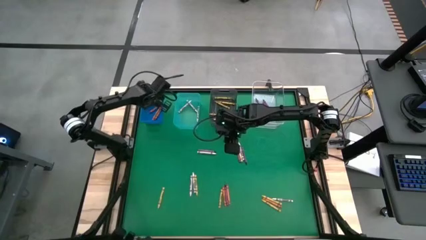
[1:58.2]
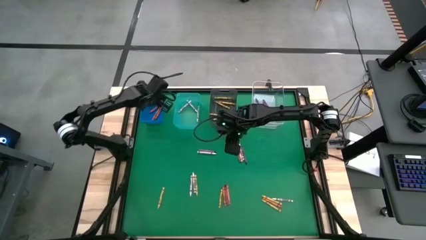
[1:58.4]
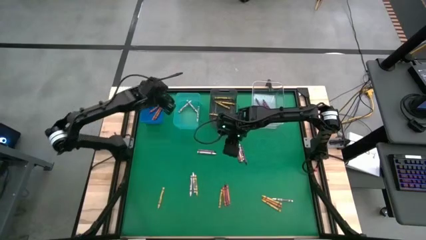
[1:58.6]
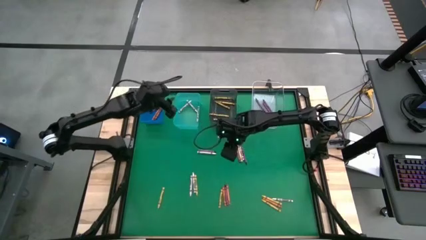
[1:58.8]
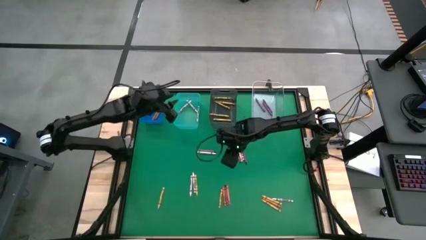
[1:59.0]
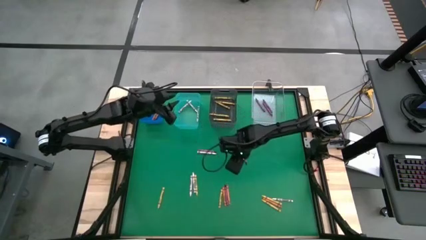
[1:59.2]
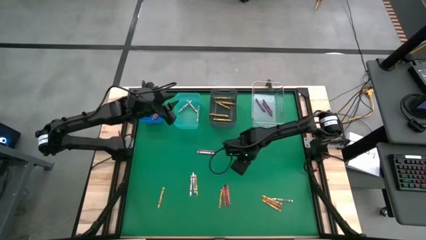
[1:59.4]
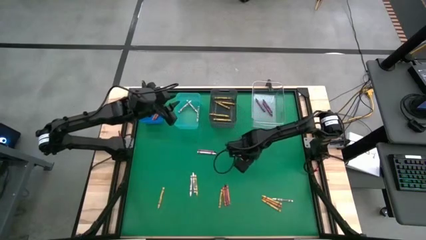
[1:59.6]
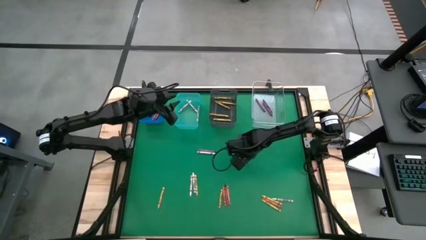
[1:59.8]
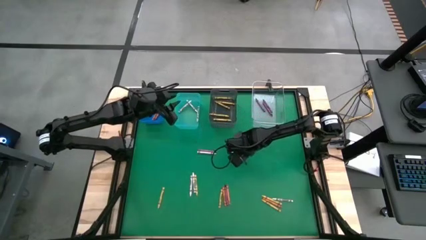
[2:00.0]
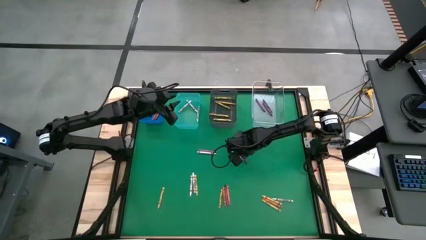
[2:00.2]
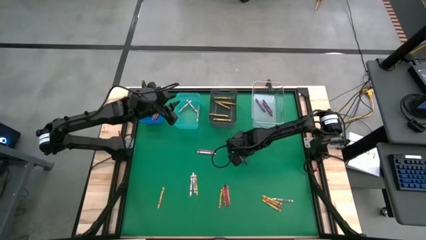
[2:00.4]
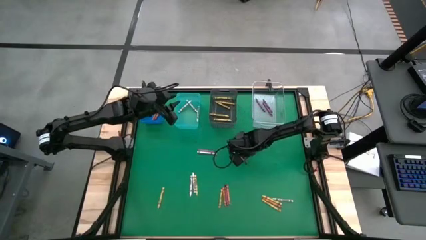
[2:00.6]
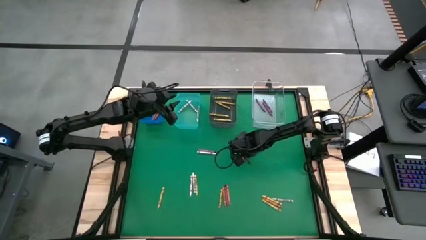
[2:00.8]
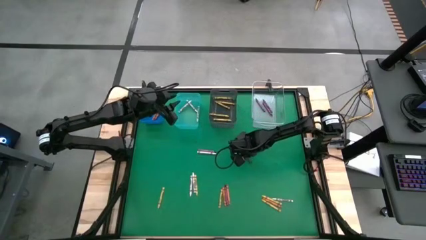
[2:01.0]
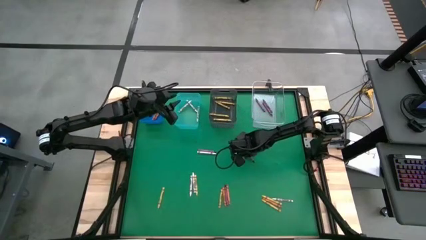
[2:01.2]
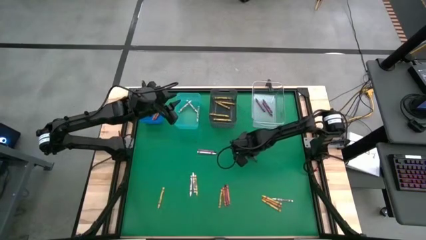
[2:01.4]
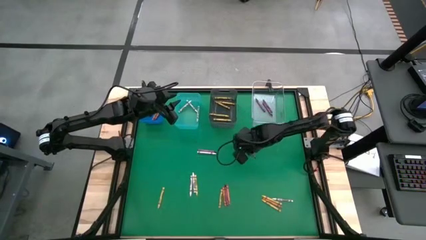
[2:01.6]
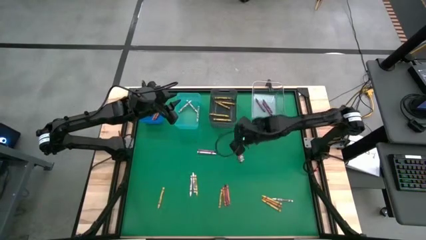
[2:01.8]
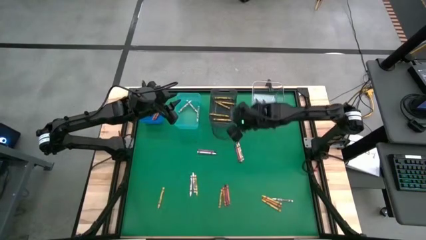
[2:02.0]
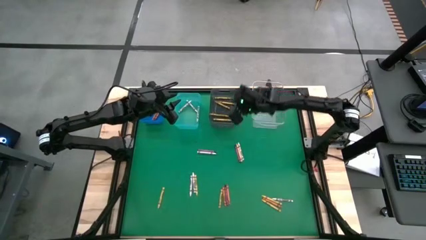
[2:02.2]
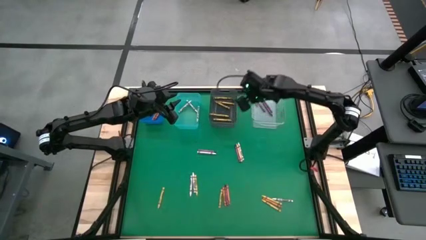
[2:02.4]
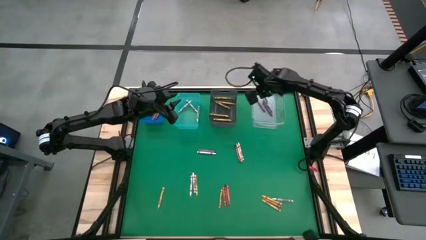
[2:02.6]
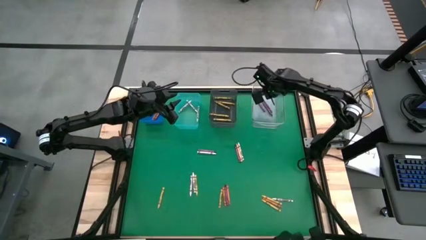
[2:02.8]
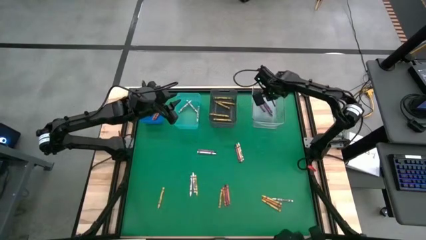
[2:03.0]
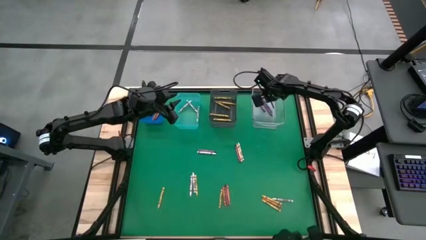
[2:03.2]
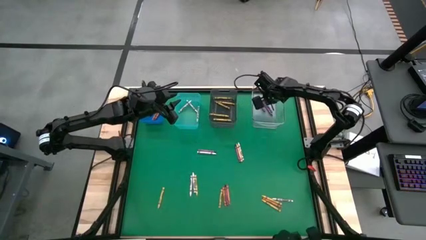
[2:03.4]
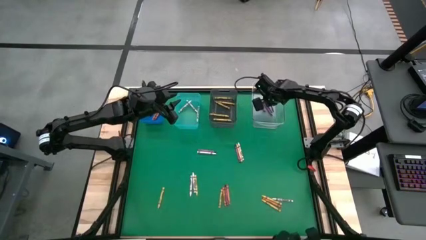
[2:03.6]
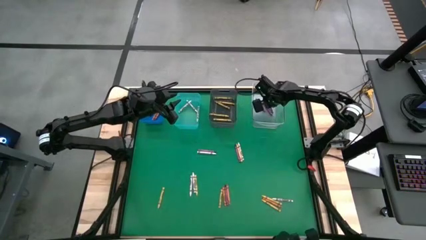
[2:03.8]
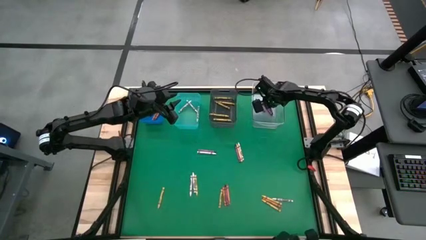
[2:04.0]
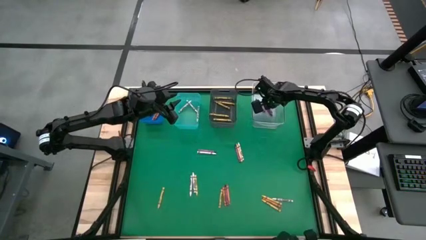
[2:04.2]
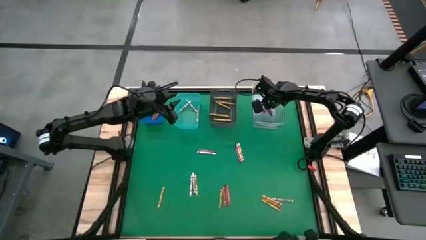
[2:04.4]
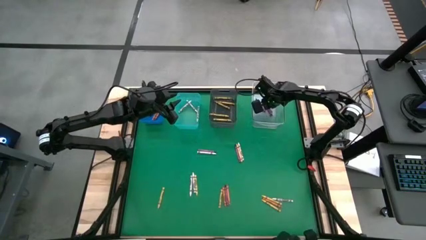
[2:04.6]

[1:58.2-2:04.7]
Task: Sort crayons
Put the violet crayon into the transparent bin

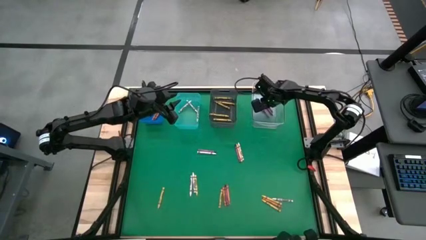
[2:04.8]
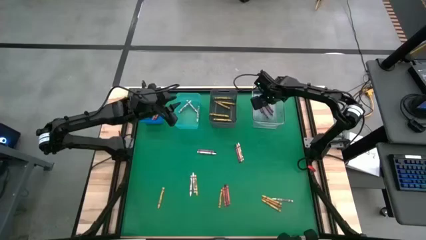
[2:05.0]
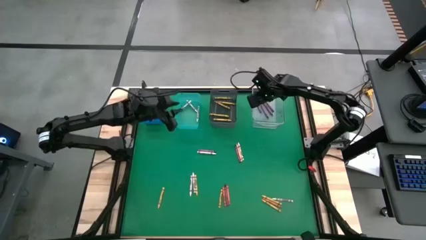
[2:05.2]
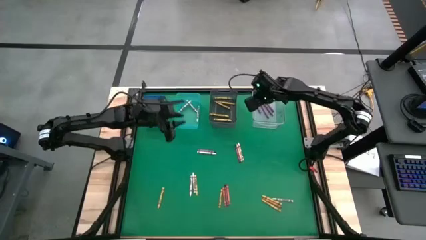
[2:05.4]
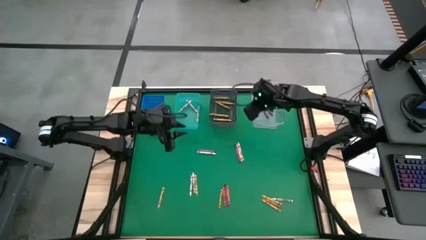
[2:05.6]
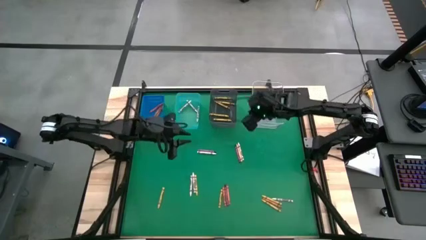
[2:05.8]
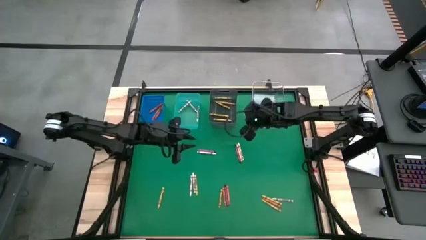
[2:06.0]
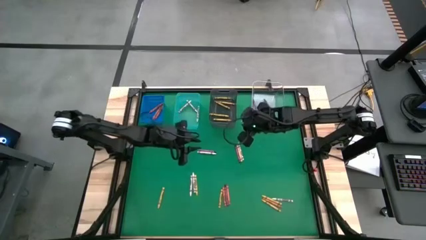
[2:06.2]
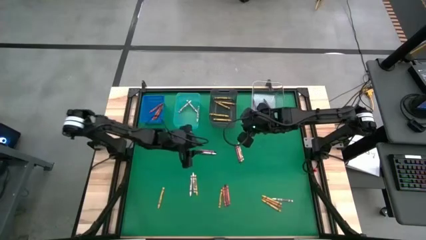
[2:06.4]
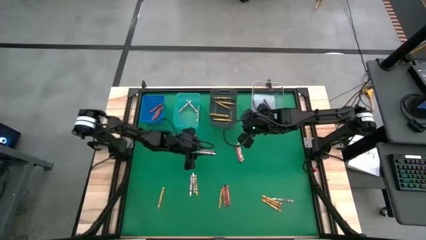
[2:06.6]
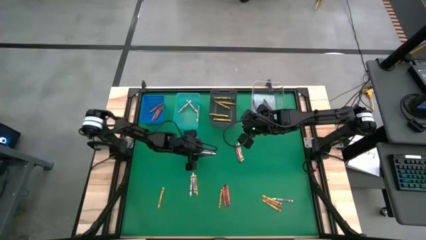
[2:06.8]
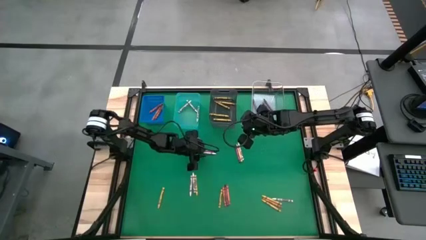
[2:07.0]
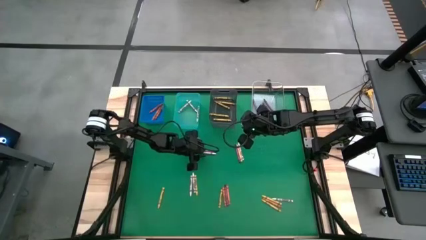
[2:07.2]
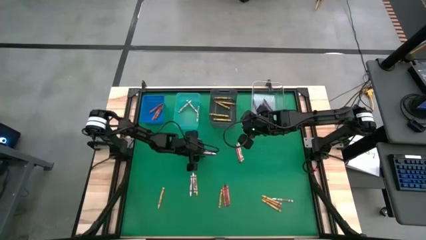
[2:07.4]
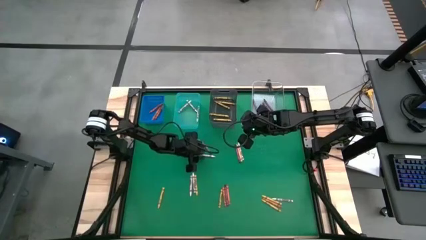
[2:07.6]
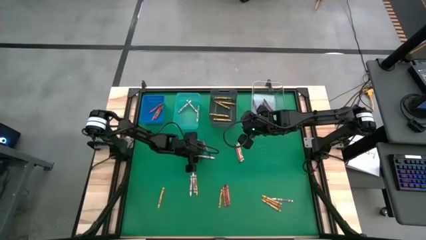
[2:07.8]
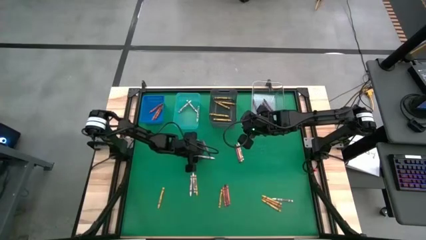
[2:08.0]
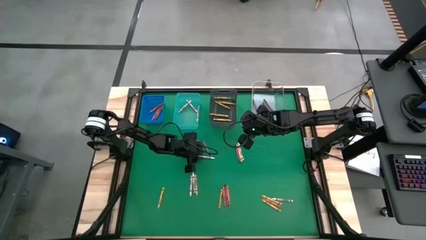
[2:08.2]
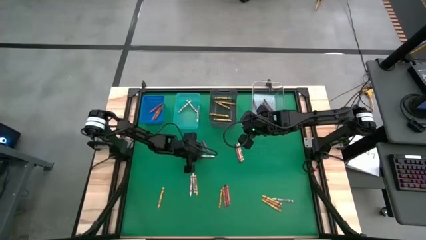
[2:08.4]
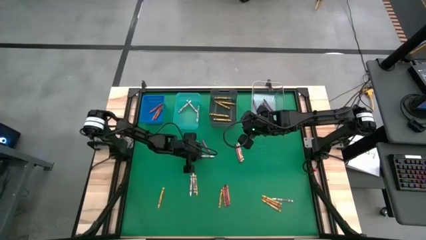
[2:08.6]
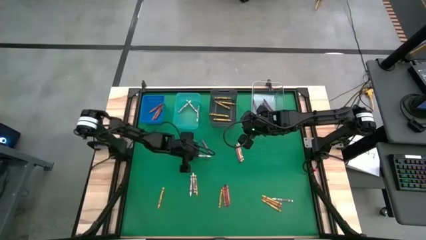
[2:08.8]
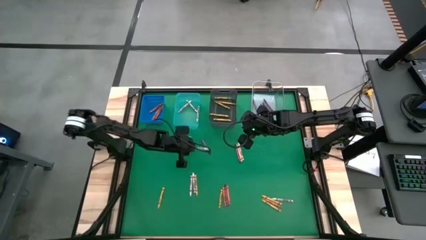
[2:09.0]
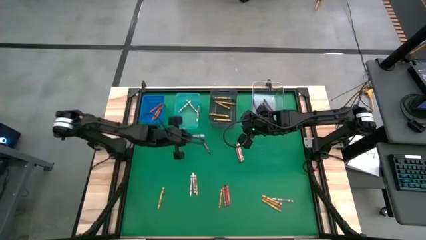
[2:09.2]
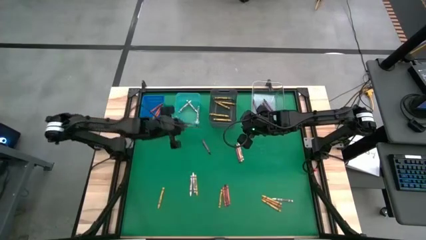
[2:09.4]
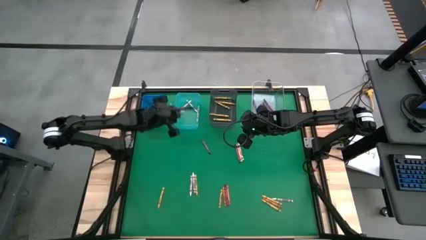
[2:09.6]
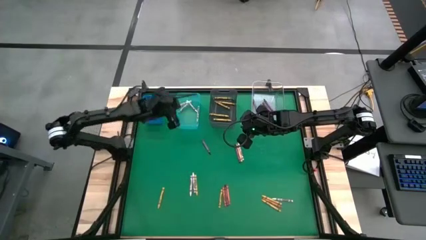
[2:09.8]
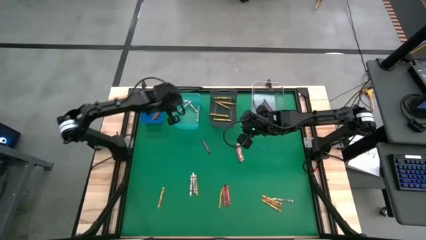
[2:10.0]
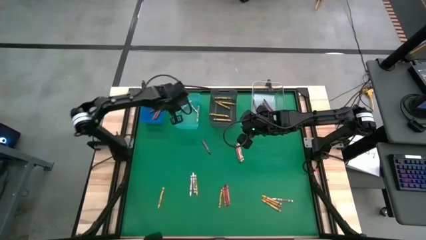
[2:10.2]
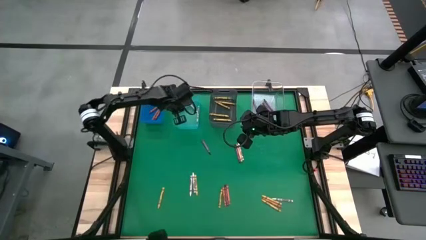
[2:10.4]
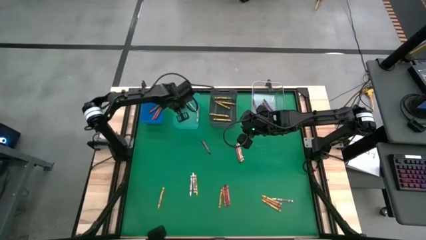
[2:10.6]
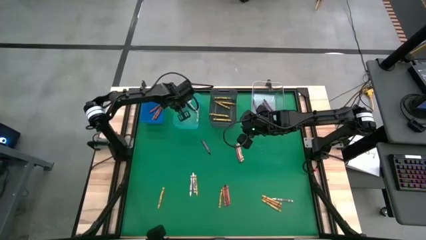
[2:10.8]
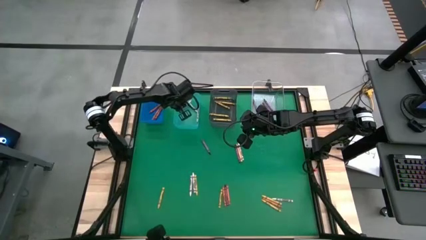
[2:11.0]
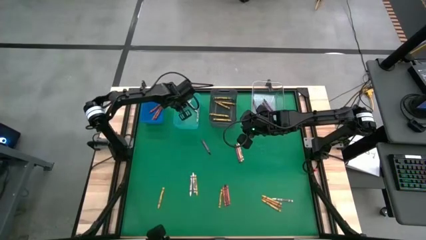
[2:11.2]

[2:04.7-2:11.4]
Put the white crayon into the light blue bin
